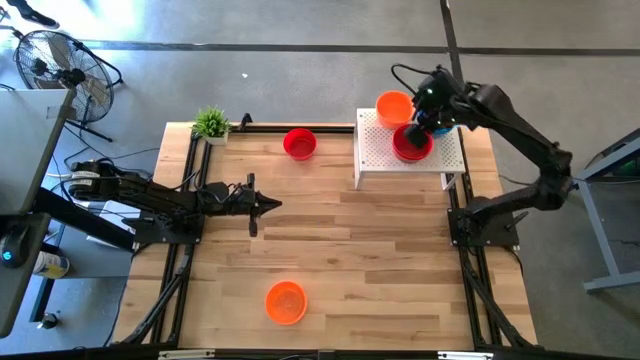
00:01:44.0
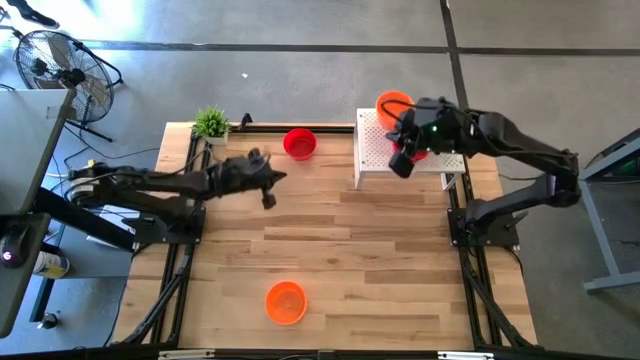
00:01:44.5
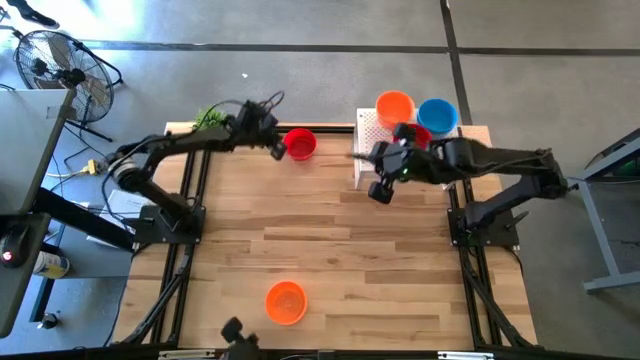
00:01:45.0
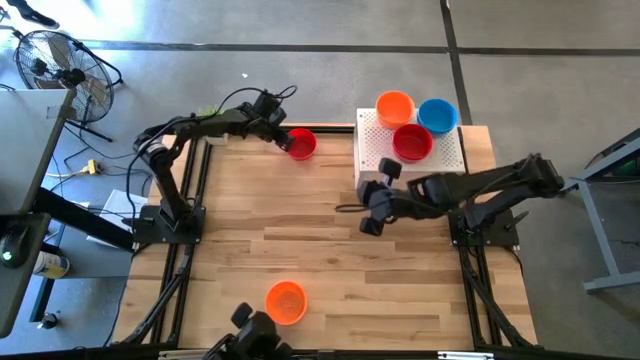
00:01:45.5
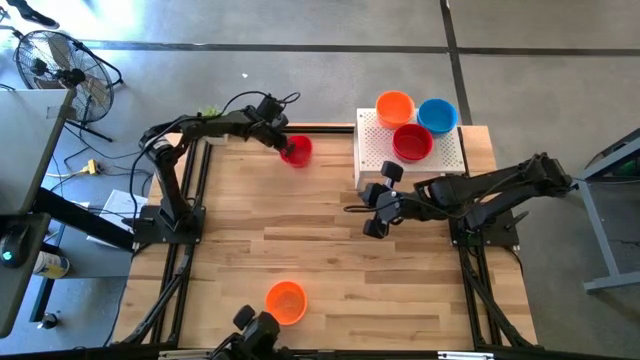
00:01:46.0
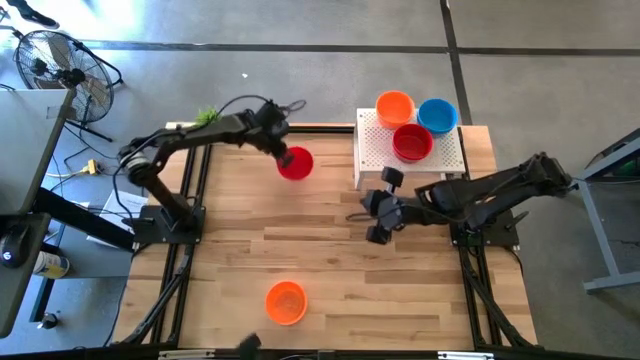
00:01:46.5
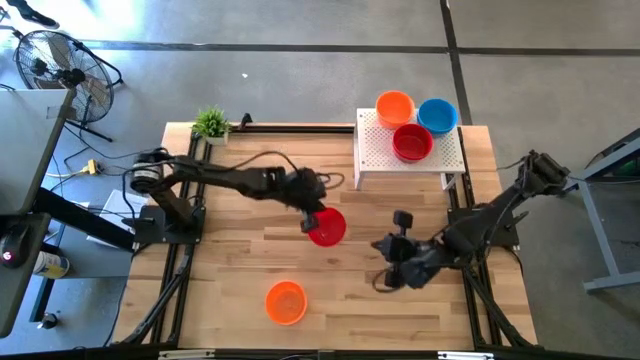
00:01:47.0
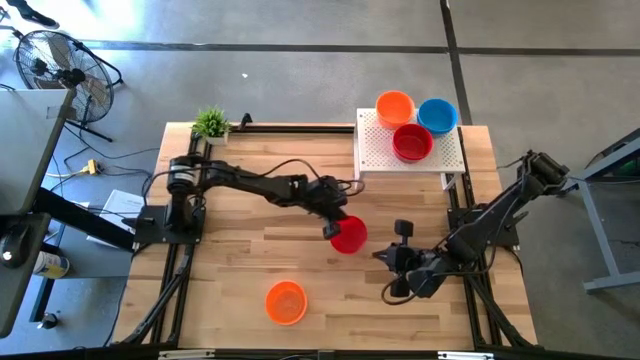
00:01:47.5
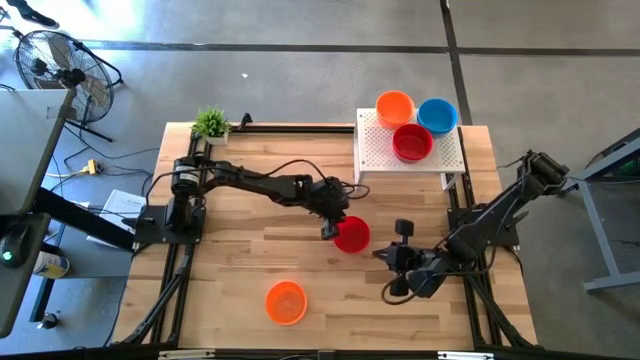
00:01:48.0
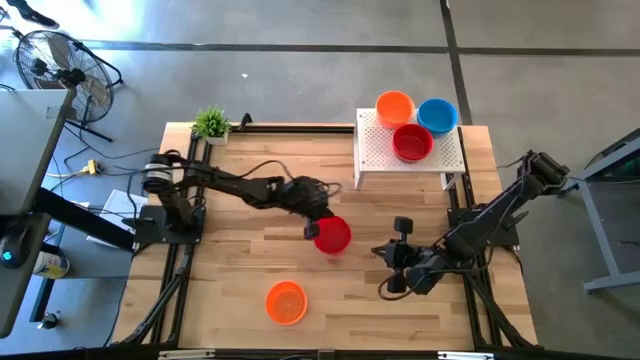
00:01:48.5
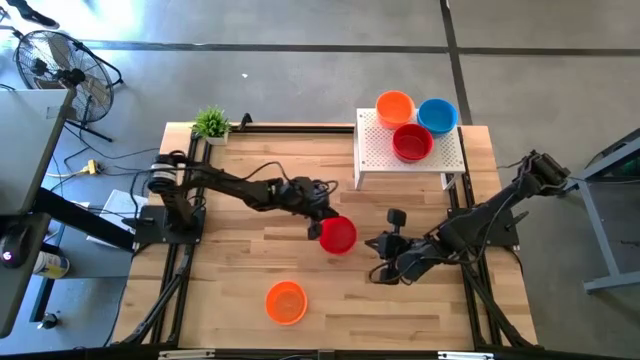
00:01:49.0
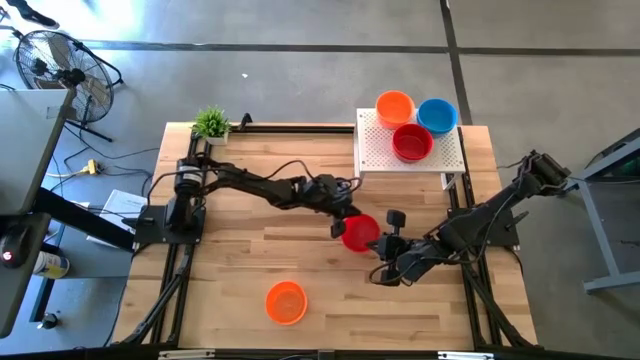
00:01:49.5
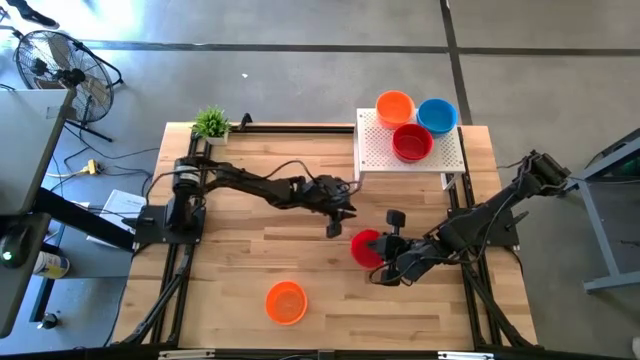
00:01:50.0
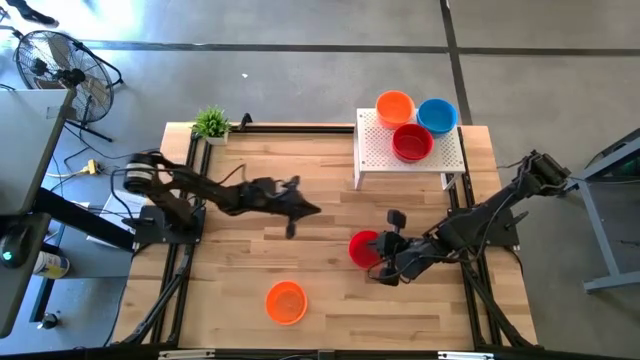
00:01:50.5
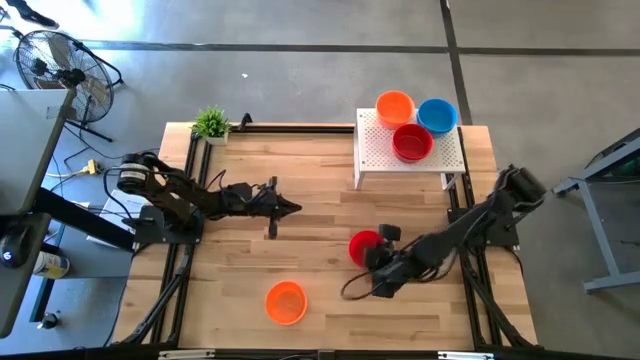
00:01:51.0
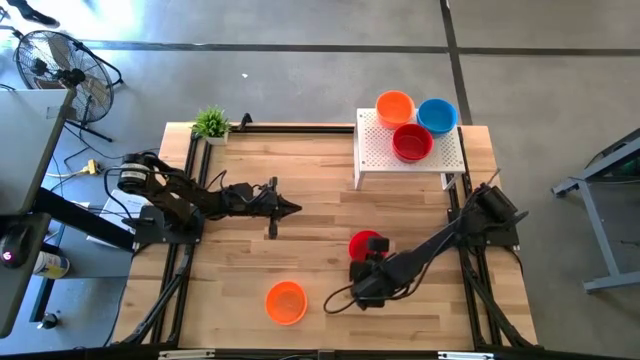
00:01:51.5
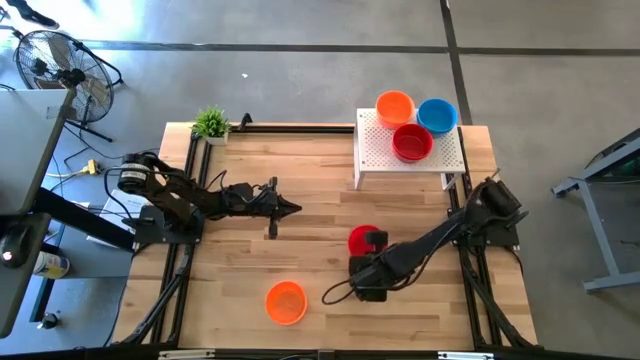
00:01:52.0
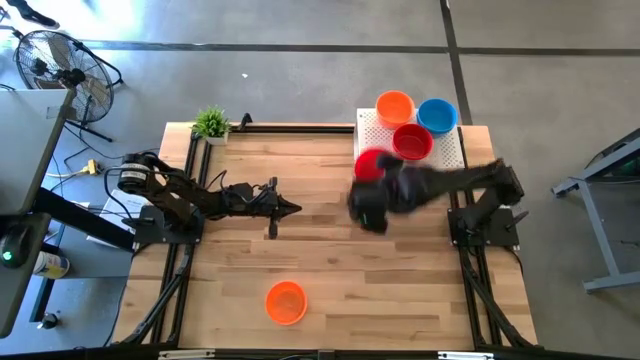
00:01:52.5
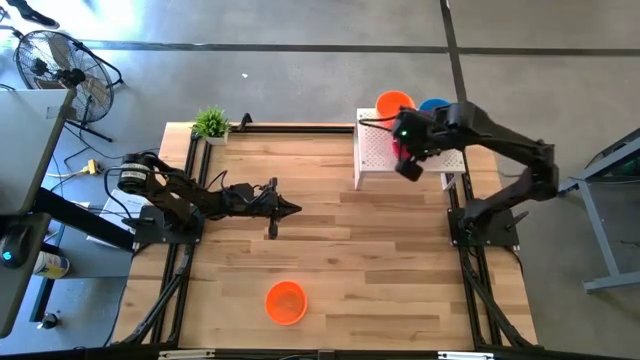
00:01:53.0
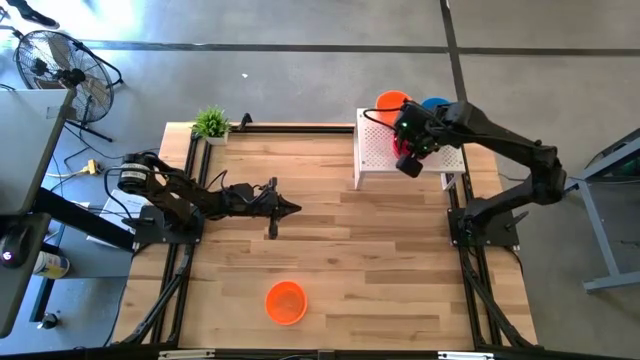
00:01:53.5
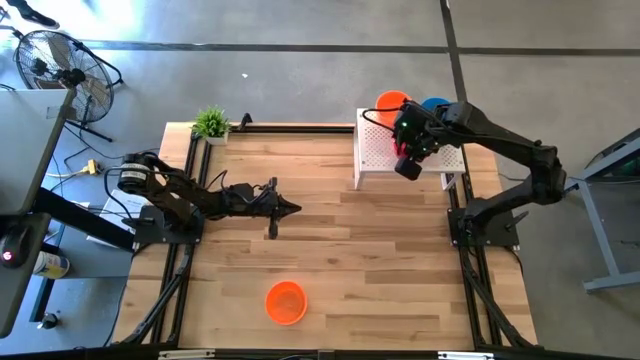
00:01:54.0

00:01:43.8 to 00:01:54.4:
Task: Pick & Place Mini bowls
Stack the red bowl on top of the red bowl on the shelf

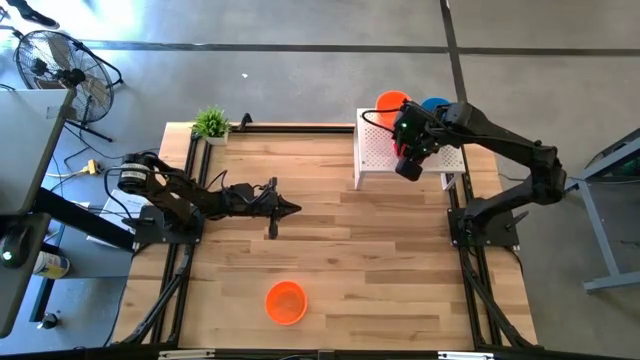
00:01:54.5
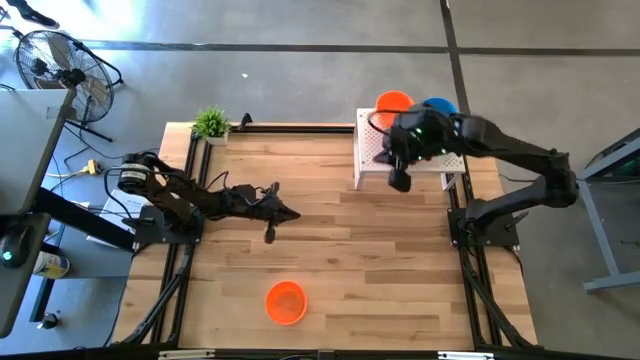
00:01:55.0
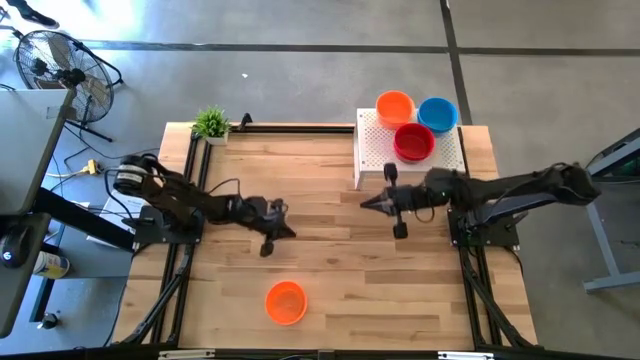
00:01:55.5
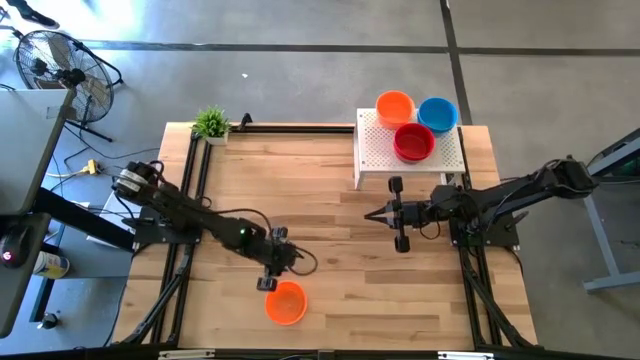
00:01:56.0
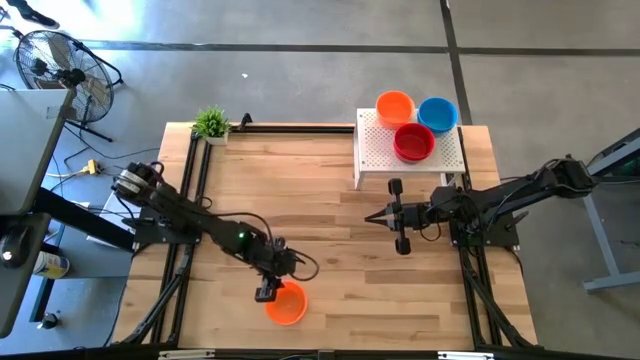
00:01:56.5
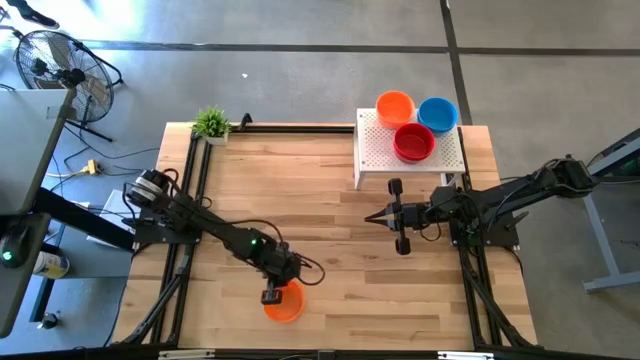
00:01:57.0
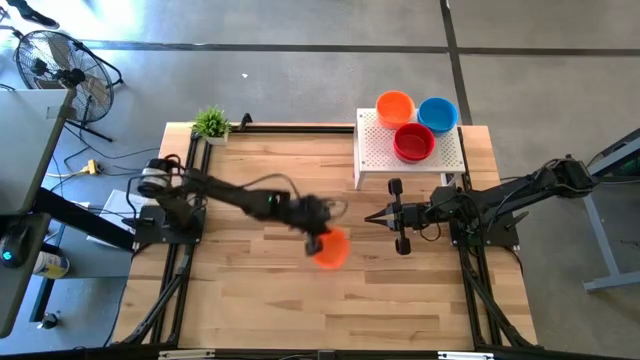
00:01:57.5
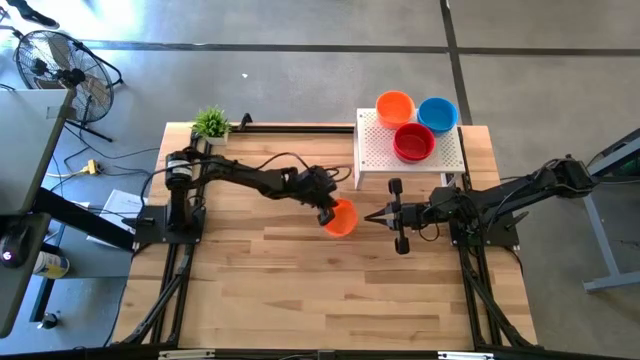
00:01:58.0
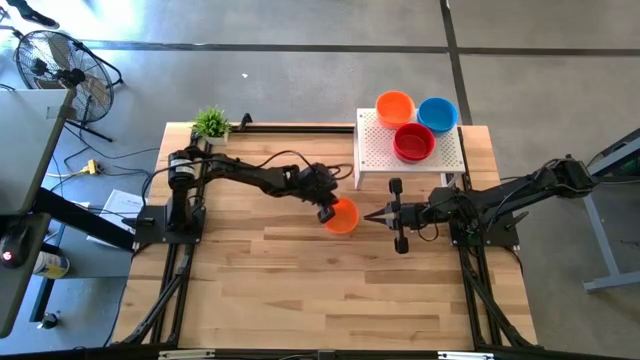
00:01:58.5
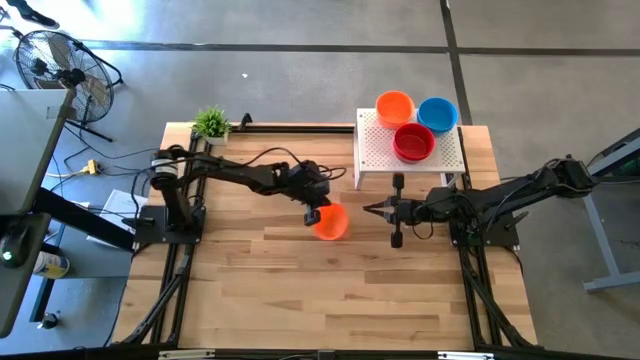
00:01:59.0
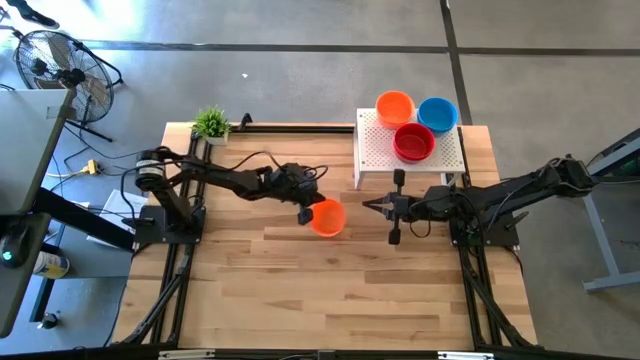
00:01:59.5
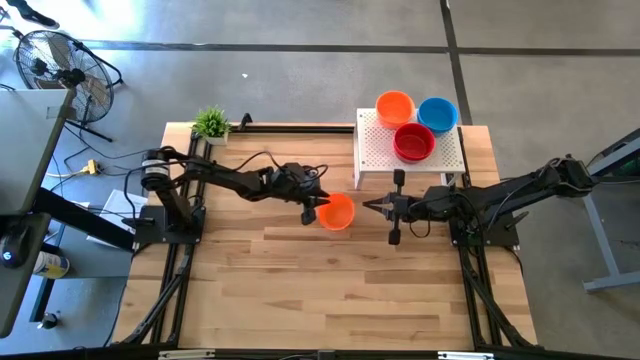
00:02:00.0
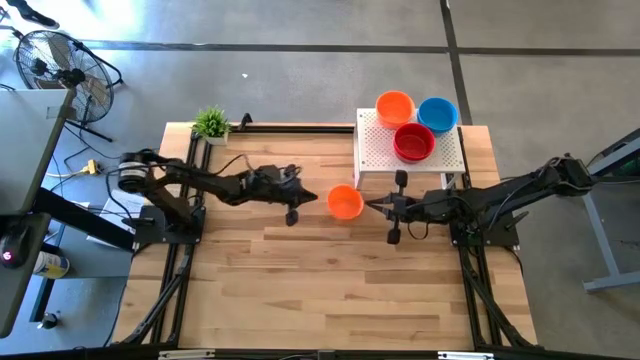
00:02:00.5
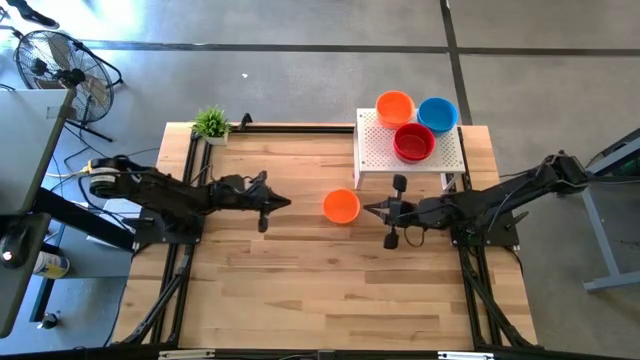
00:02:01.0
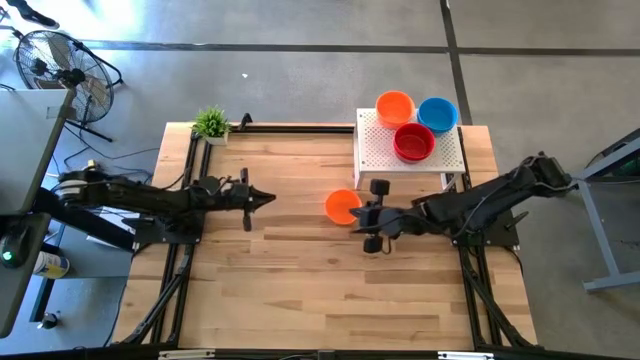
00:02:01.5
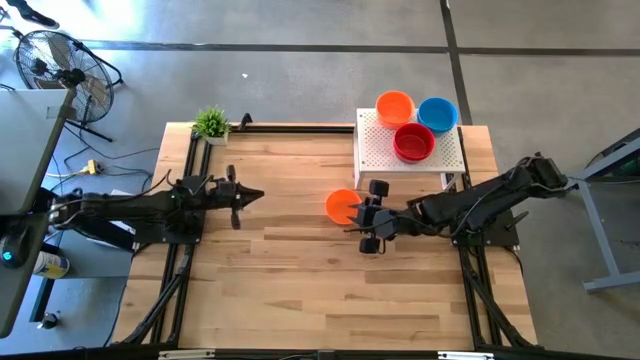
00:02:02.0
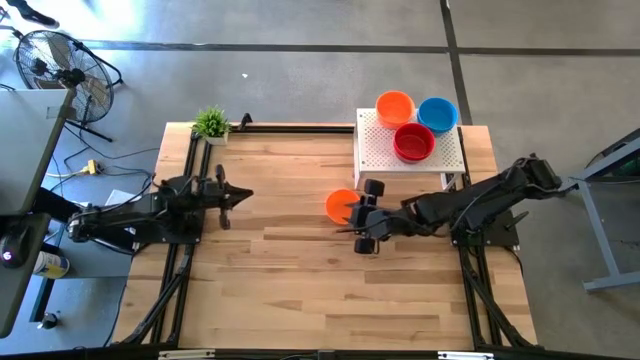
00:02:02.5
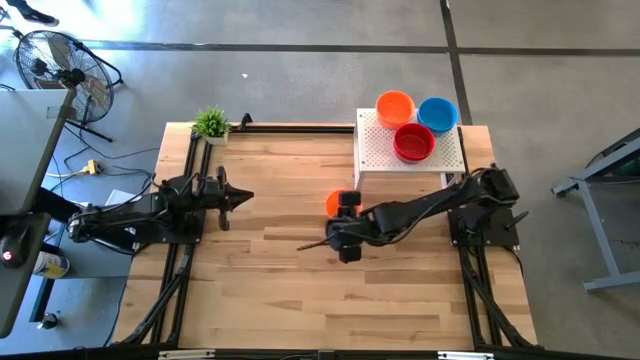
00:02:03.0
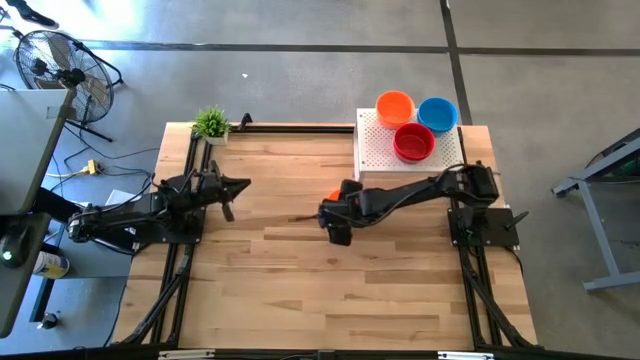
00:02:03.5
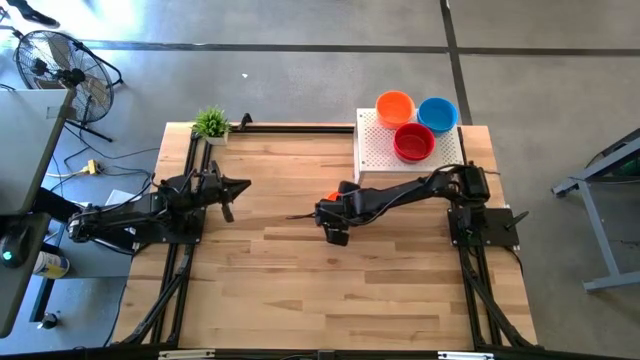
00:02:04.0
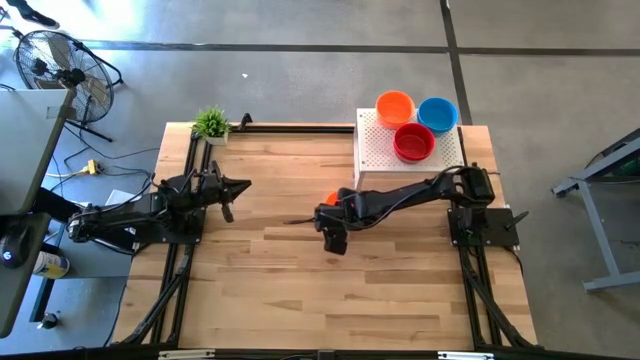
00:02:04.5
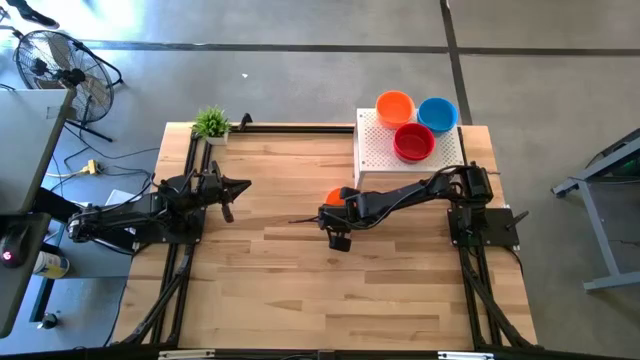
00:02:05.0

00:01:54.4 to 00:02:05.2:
Stack the orange bowl on top of the orange bowl on the shelf
